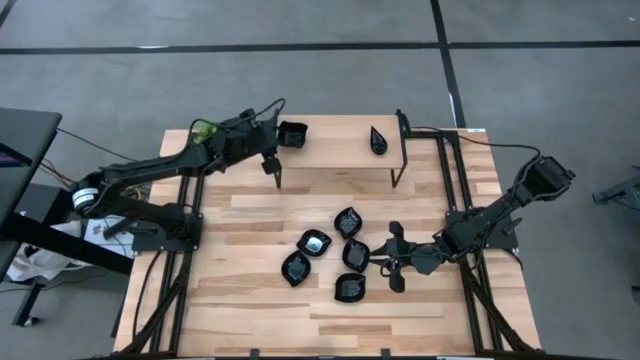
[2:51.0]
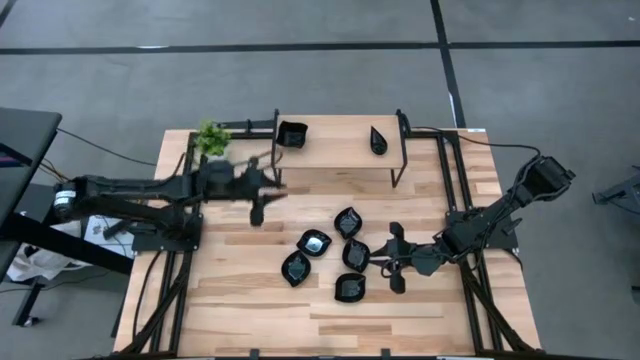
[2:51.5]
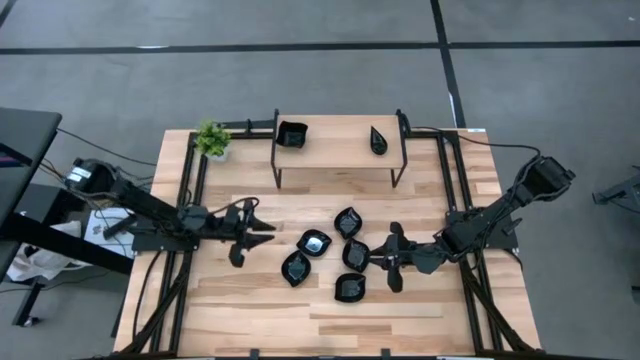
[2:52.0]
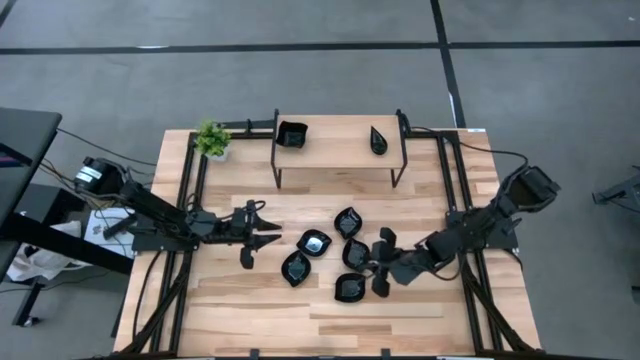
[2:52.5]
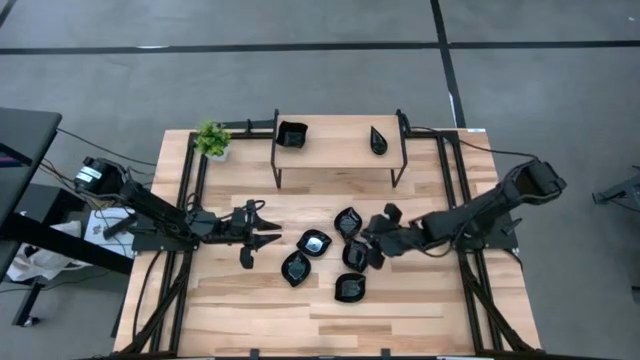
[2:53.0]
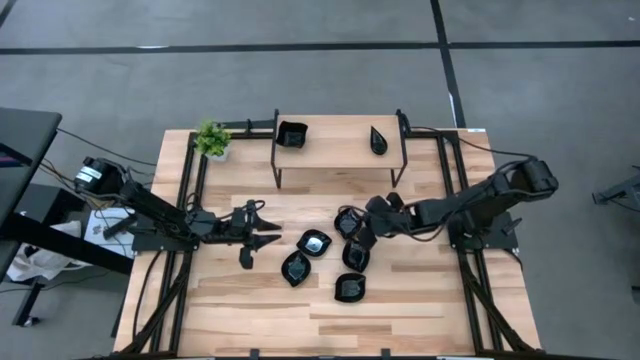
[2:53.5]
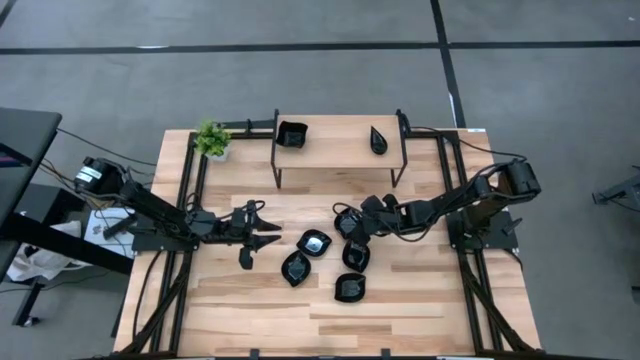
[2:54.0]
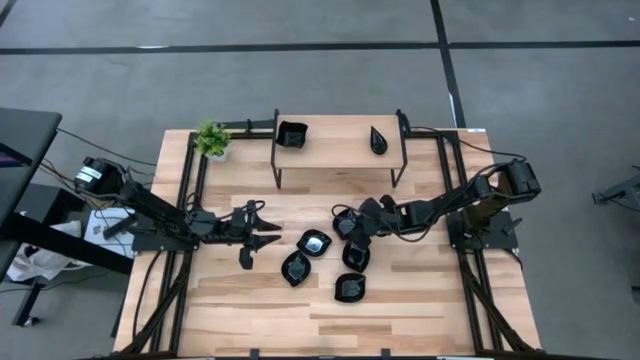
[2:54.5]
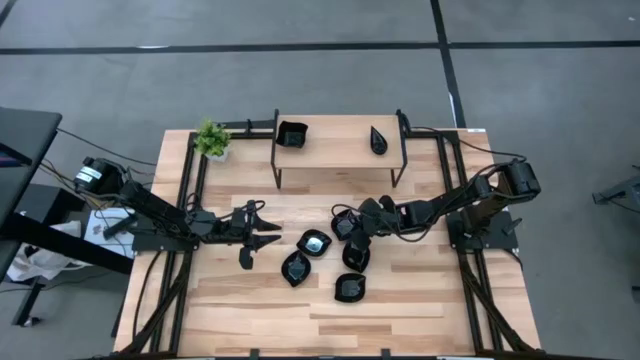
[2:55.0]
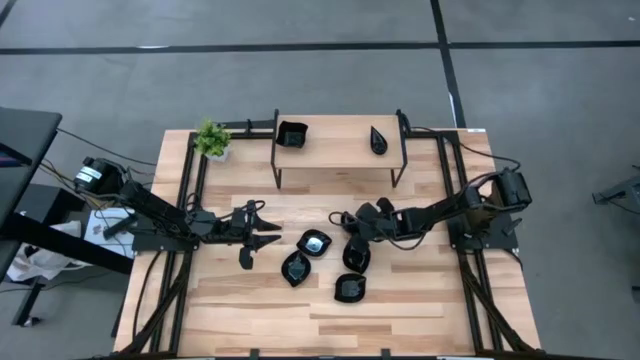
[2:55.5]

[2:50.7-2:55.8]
Task: Pick & Place Mini shaped plates
Put the black leaf shaped plate on the shelf

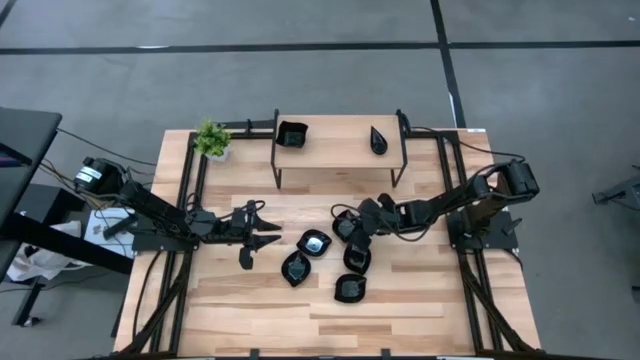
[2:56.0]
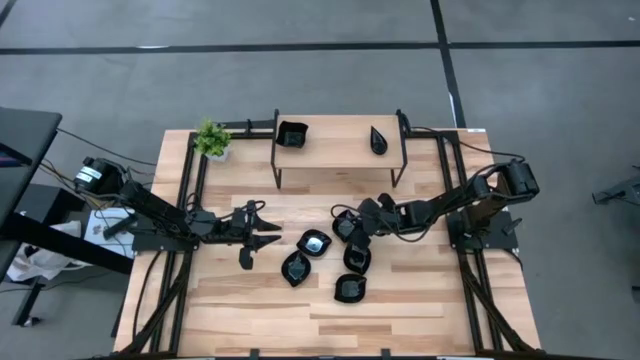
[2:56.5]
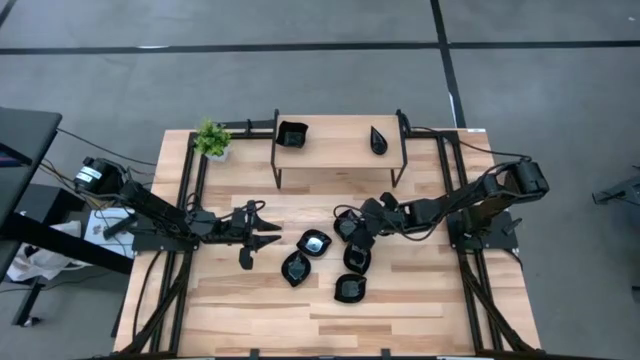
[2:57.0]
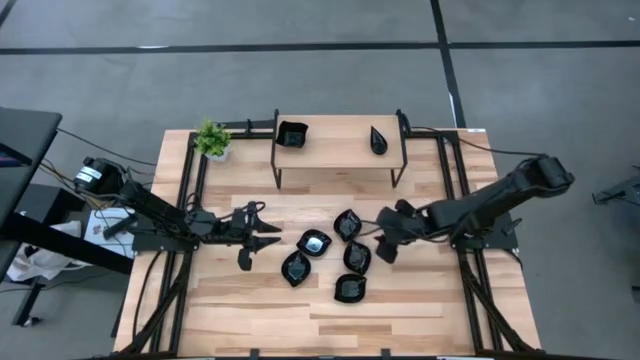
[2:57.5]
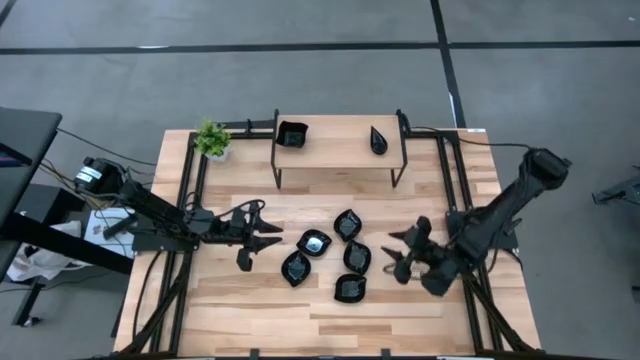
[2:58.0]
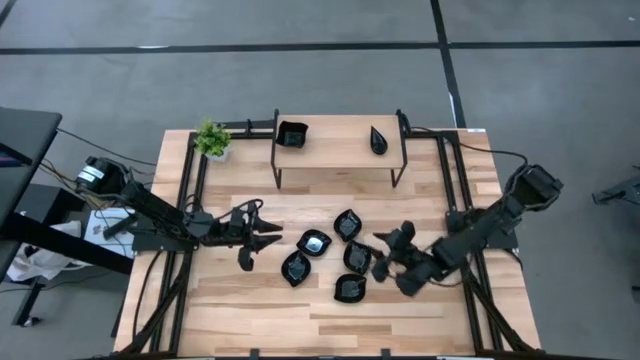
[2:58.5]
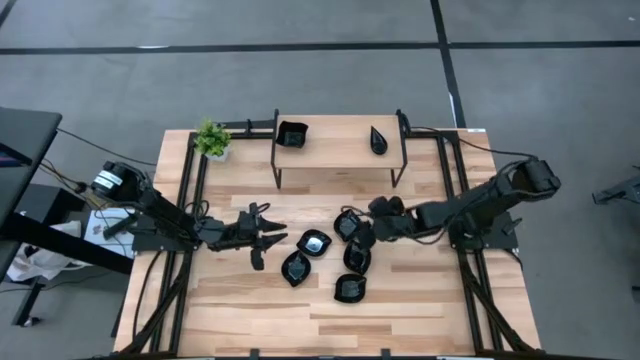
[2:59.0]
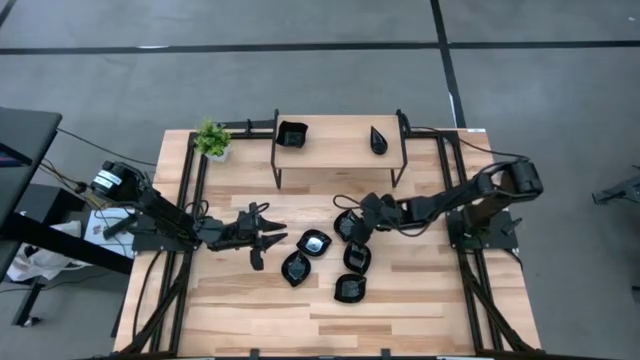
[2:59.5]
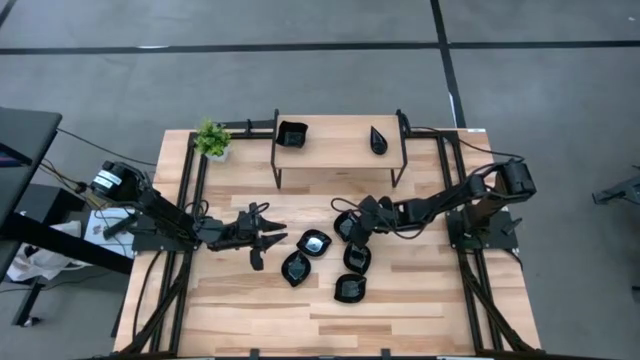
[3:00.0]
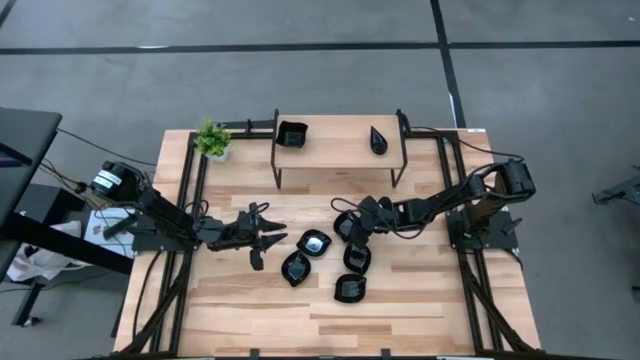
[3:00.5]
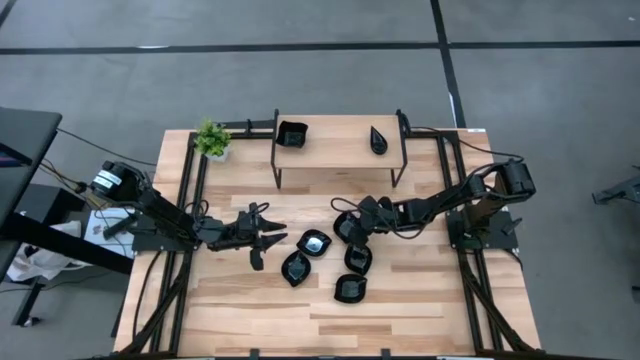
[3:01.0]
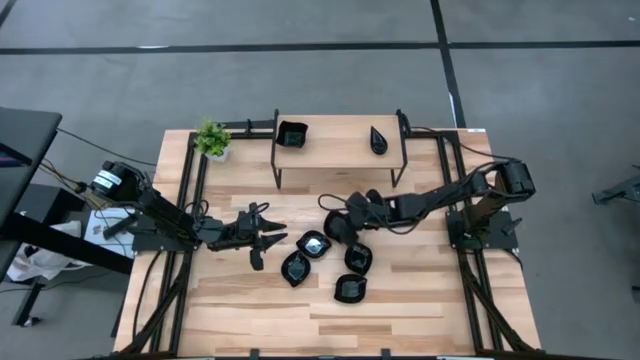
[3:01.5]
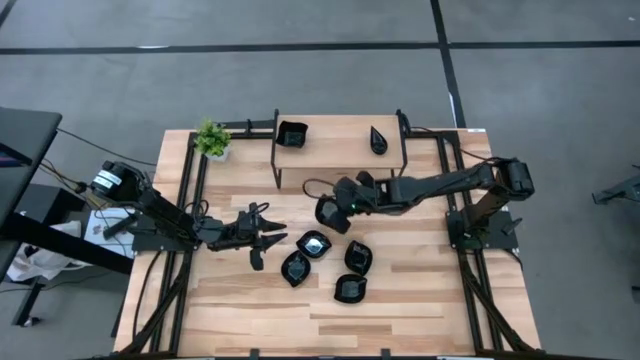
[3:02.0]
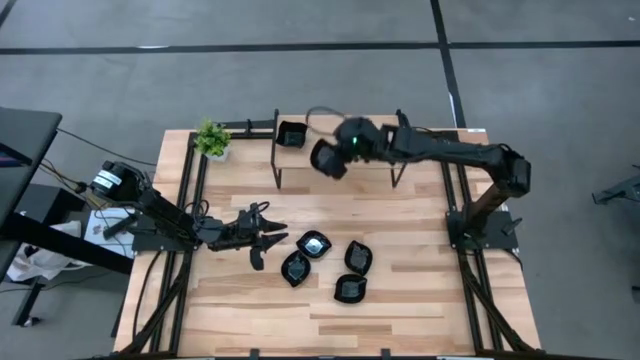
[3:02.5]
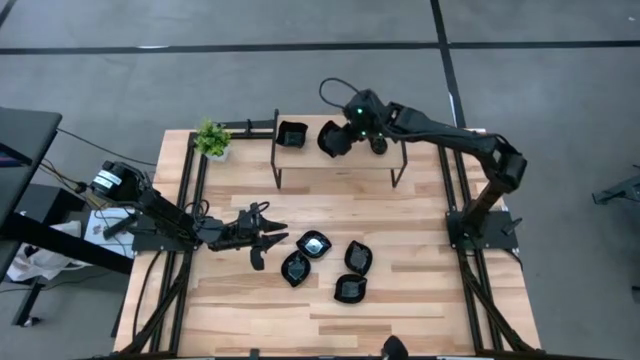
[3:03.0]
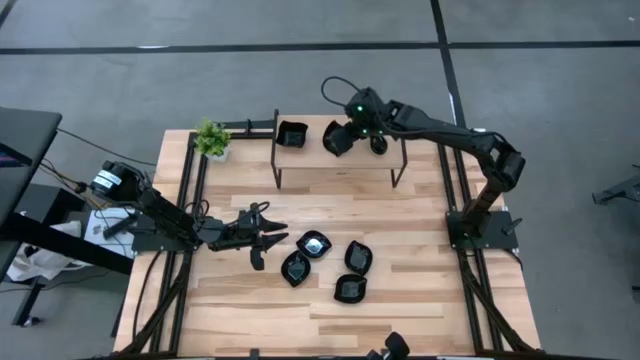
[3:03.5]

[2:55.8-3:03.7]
Put the black leaf shaped plate on the shelf

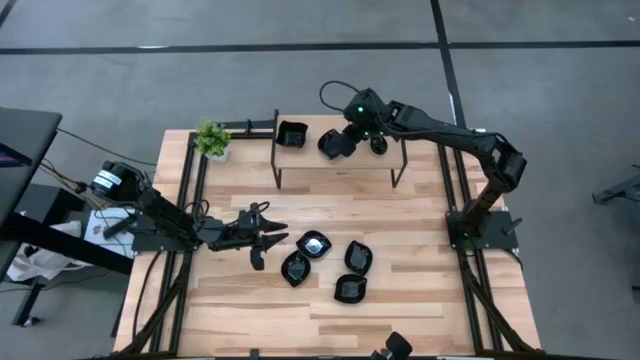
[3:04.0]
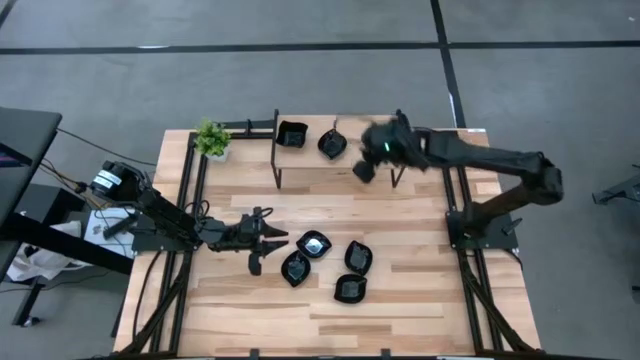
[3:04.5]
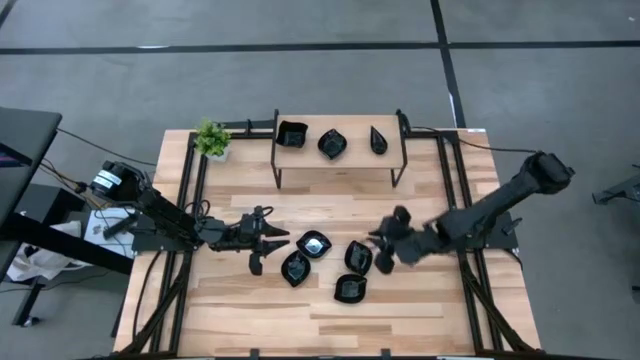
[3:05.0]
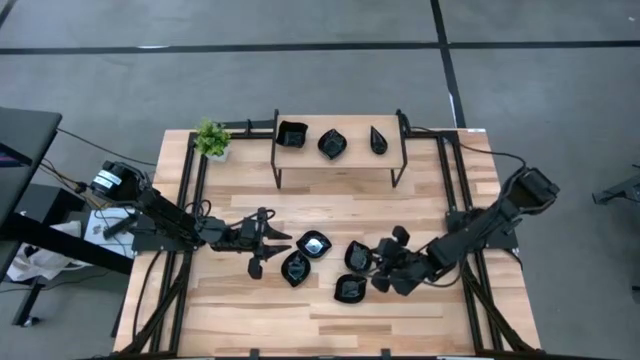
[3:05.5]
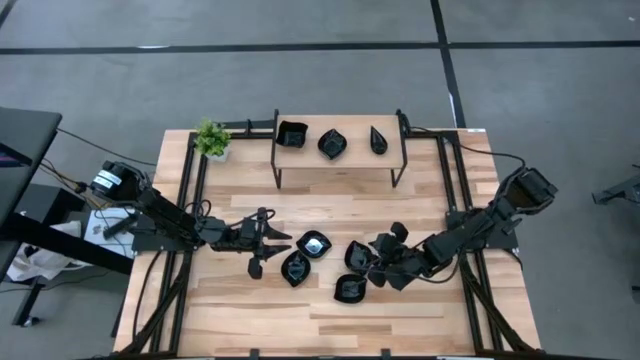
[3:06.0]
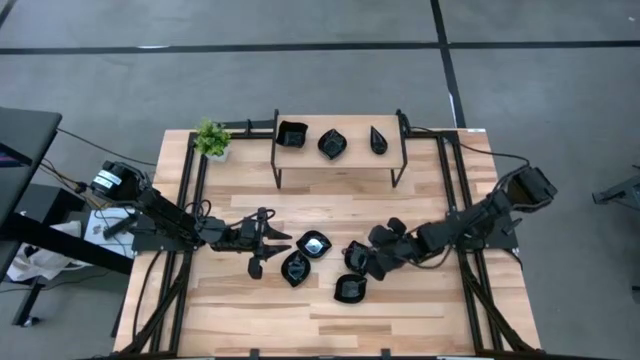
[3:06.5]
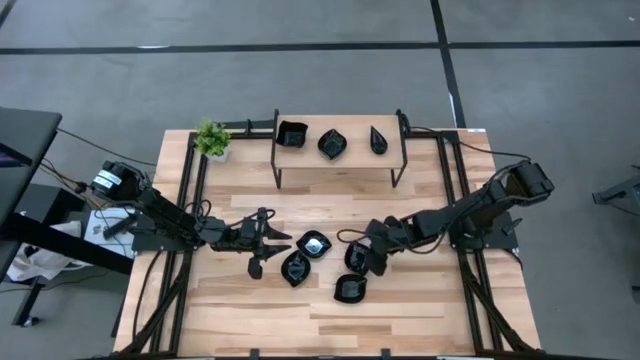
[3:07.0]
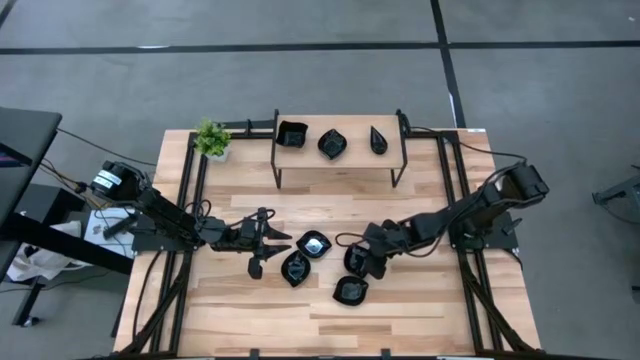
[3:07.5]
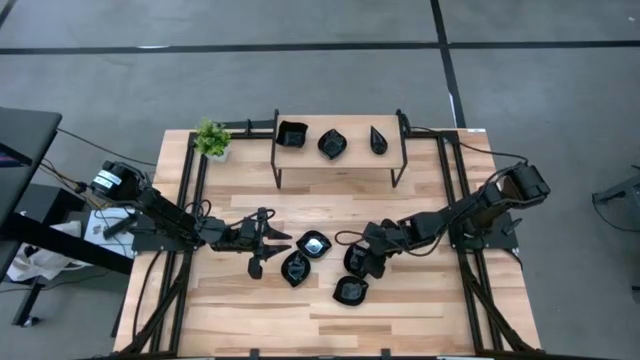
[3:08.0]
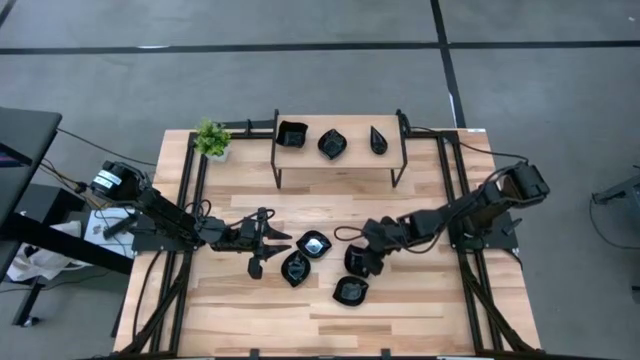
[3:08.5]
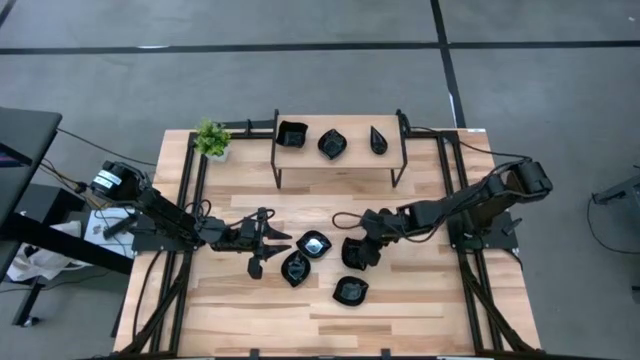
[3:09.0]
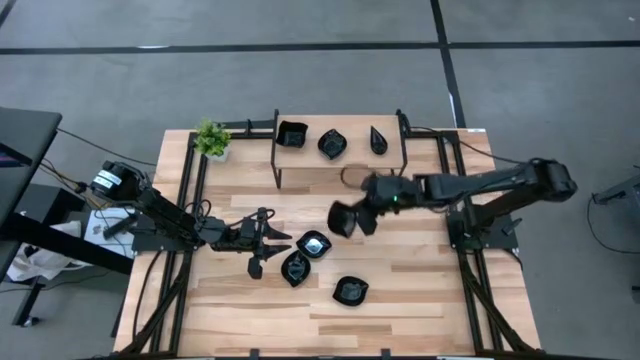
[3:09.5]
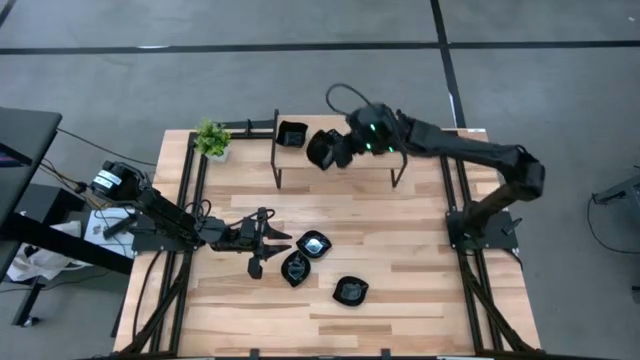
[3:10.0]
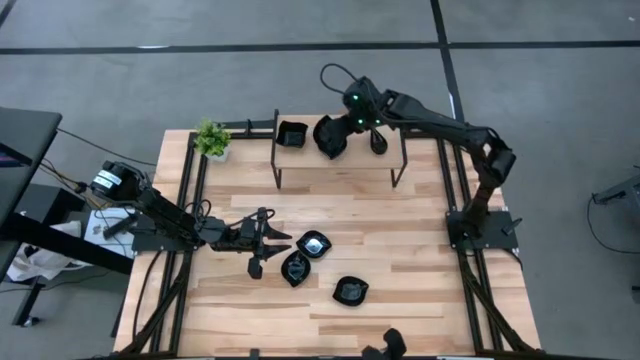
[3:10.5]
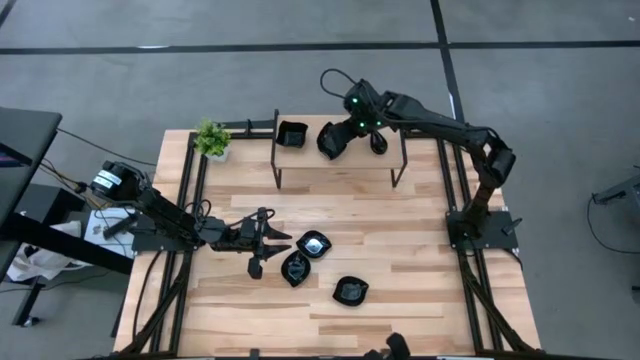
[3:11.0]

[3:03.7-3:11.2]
Stack the black leaf shaped plate on top of the black leaf shaped plate on the shelf

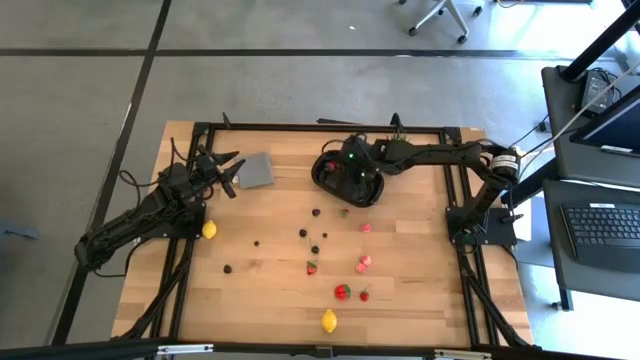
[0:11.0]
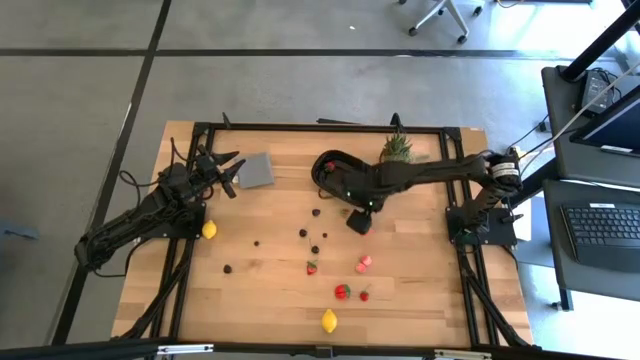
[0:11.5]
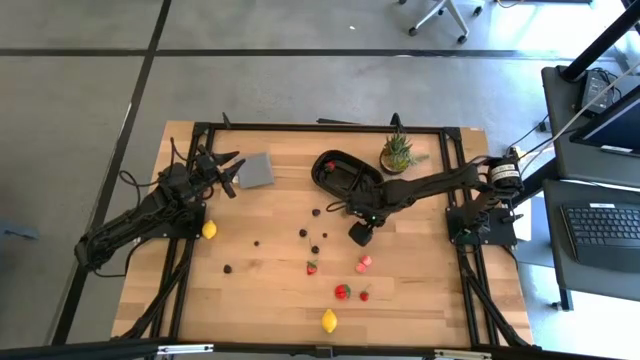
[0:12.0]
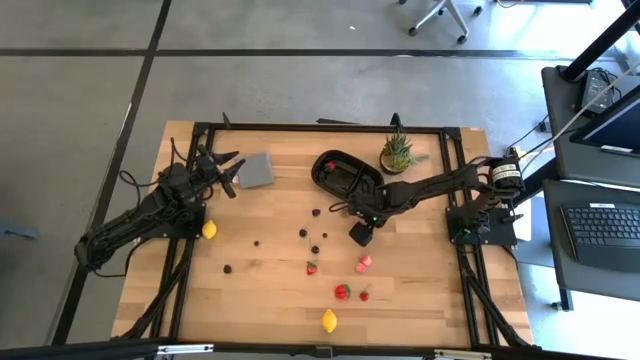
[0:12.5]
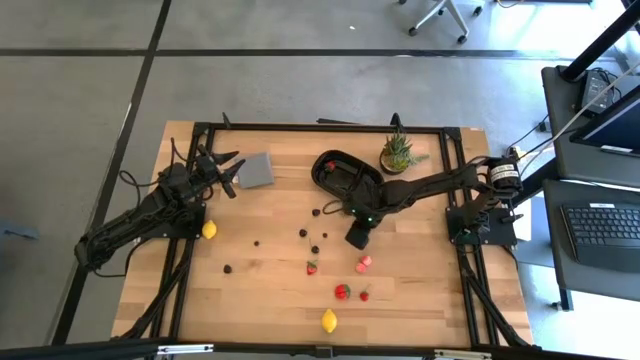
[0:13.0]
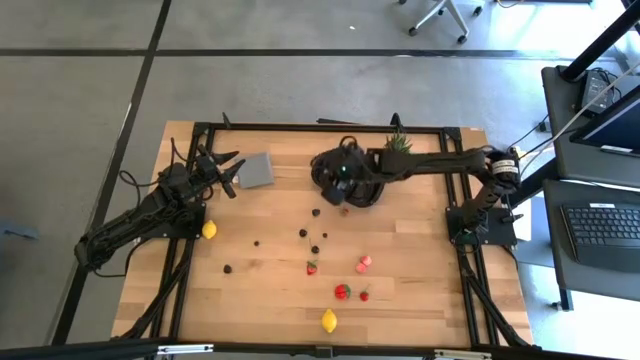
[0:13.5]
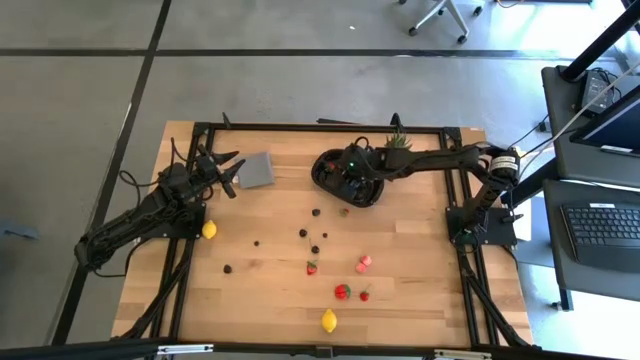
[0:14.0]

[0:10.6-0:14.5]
Task: Pick and placing Produce into tupperware
Put the top apricot into the black bin
